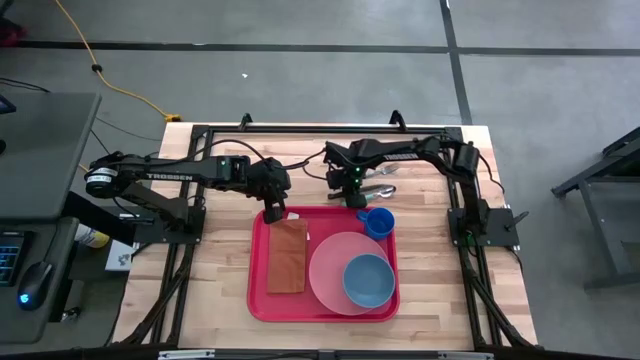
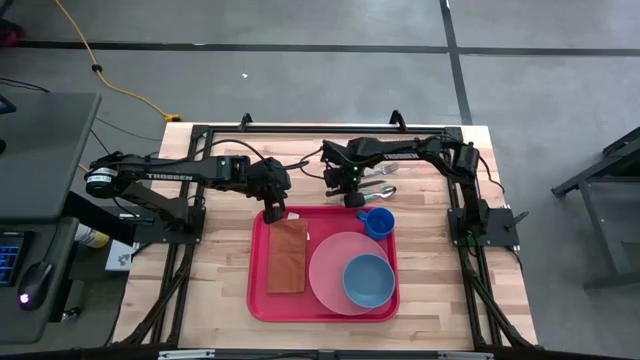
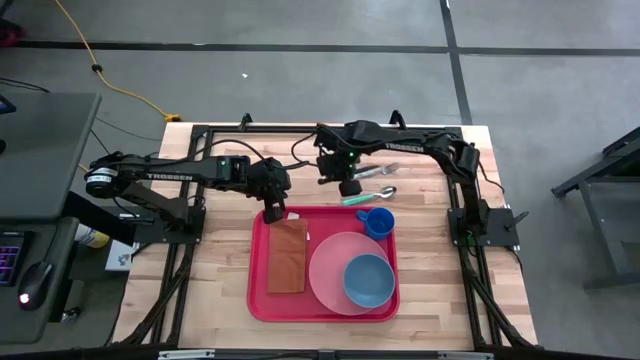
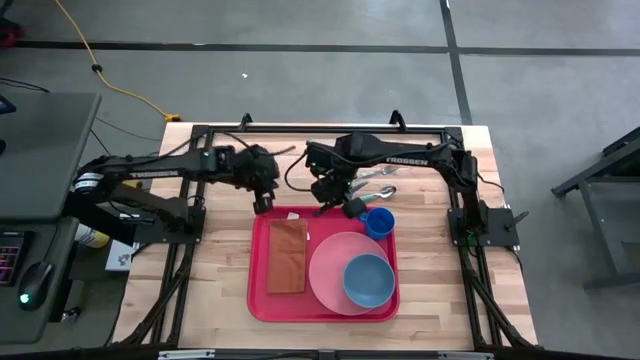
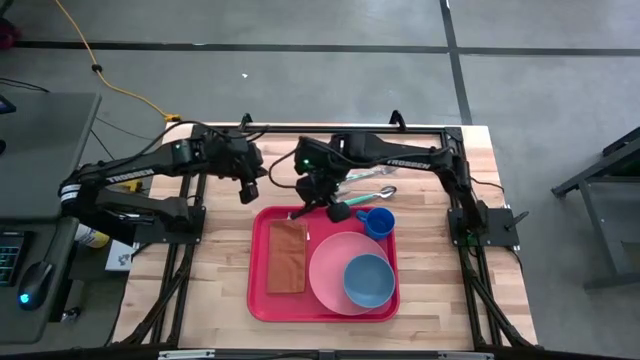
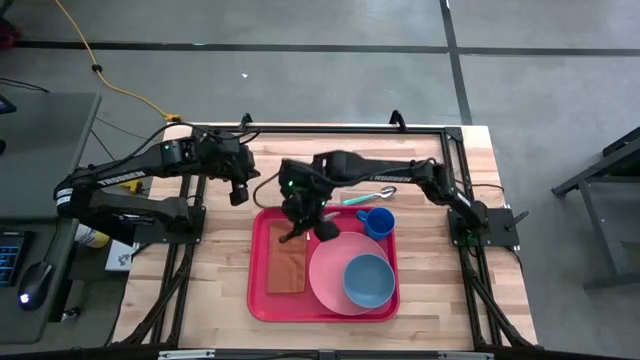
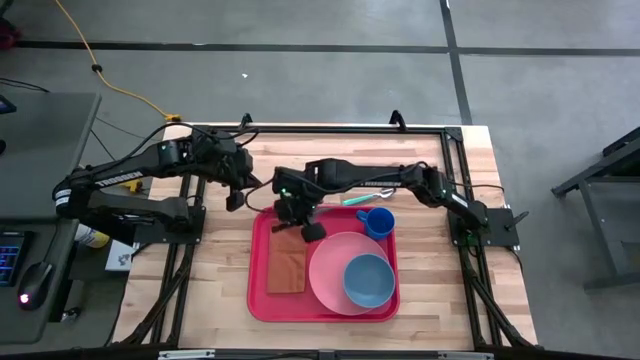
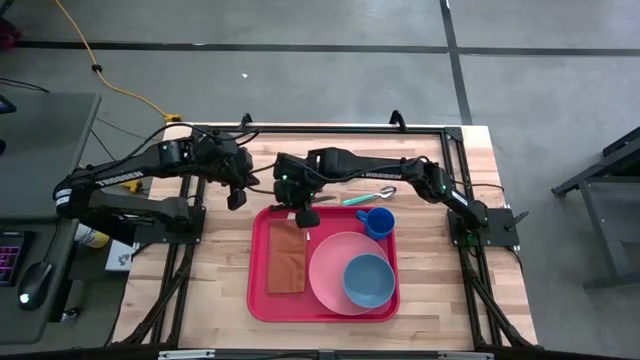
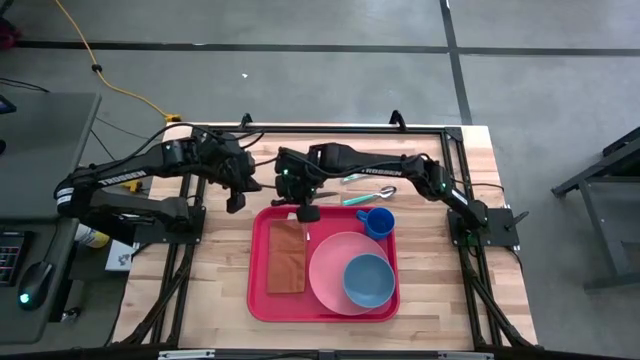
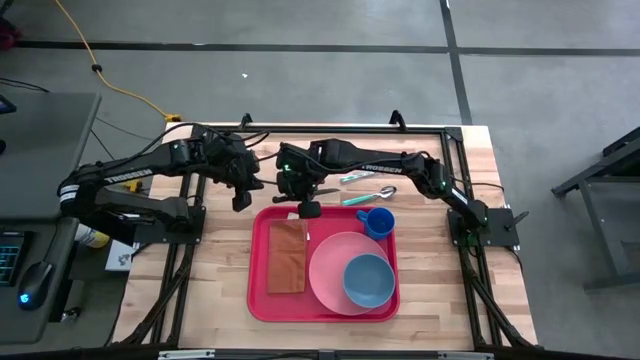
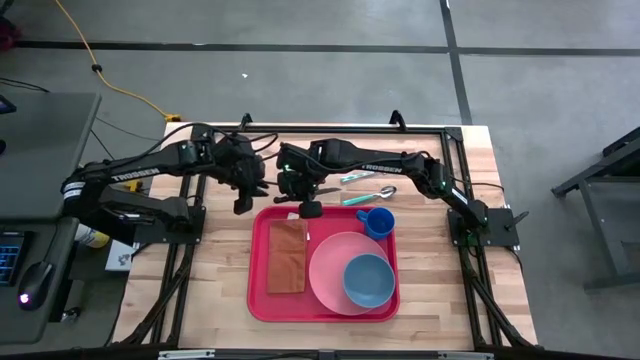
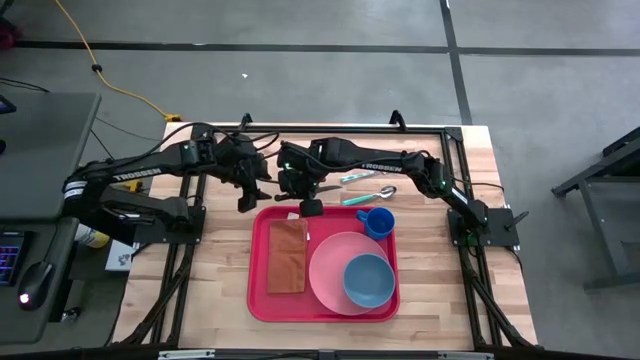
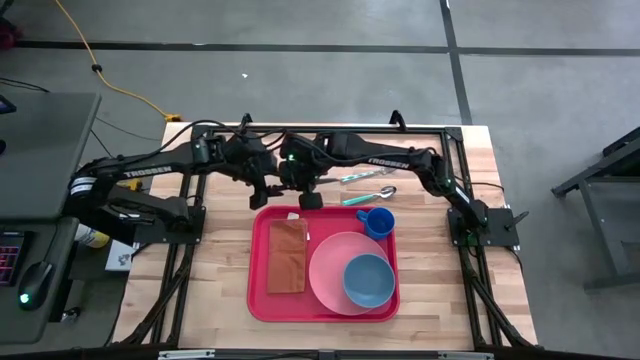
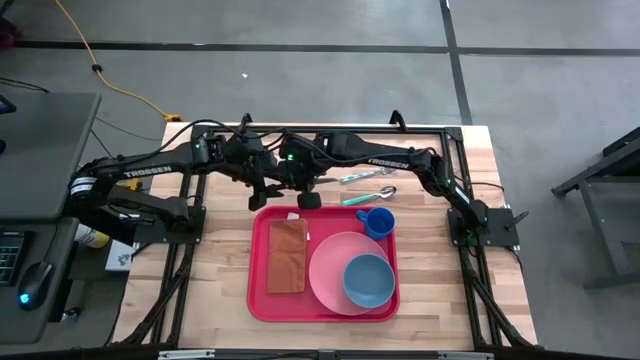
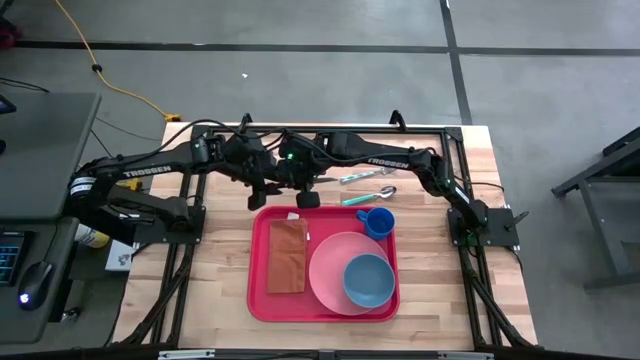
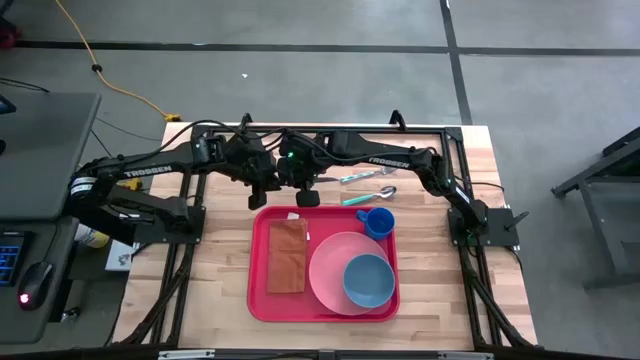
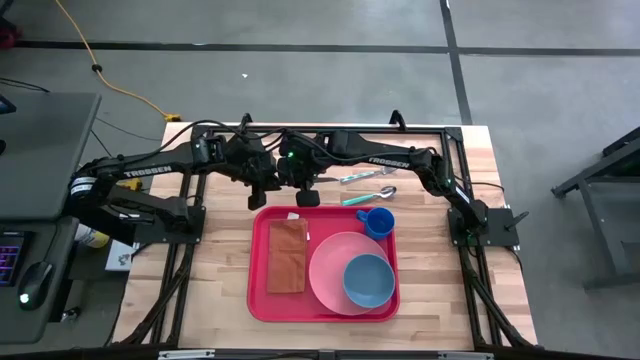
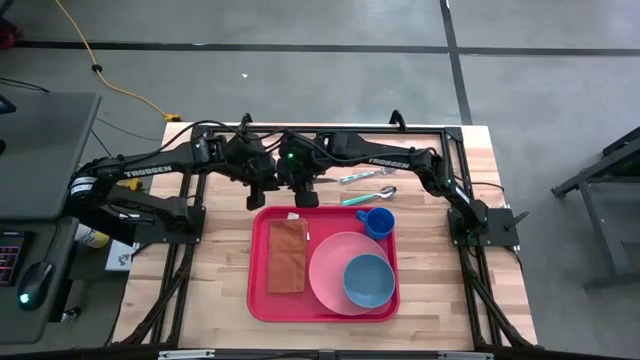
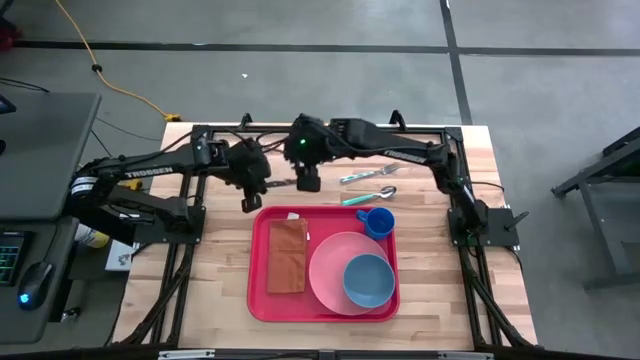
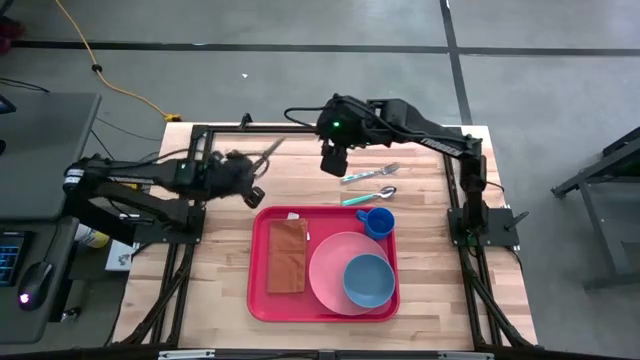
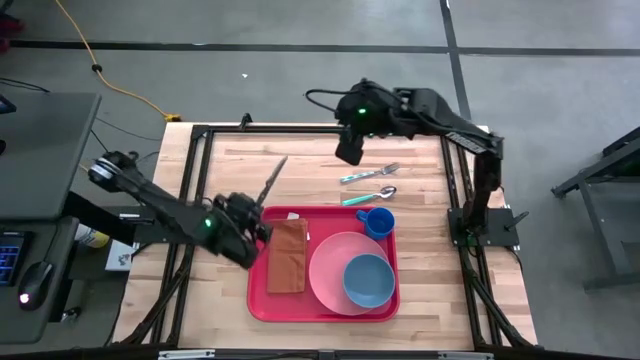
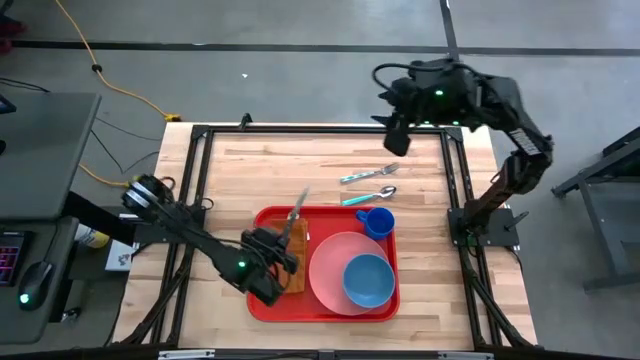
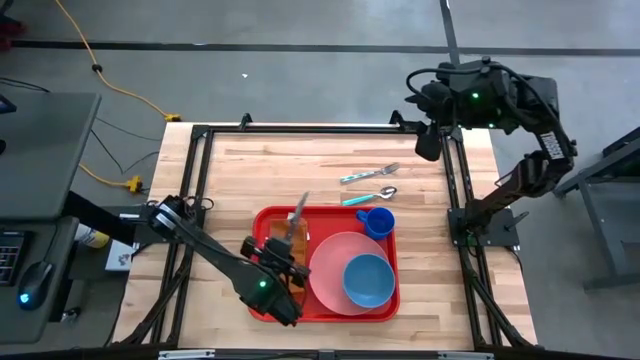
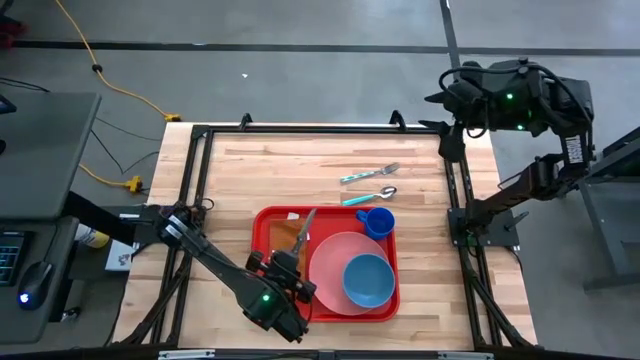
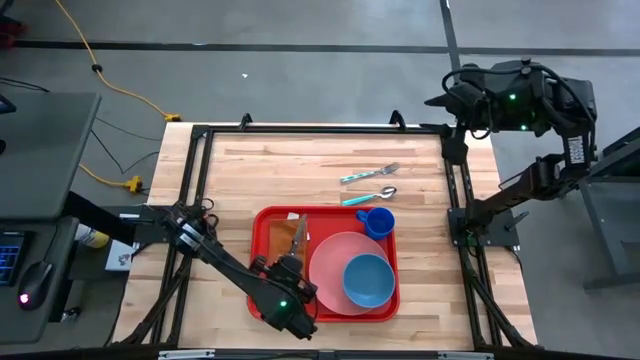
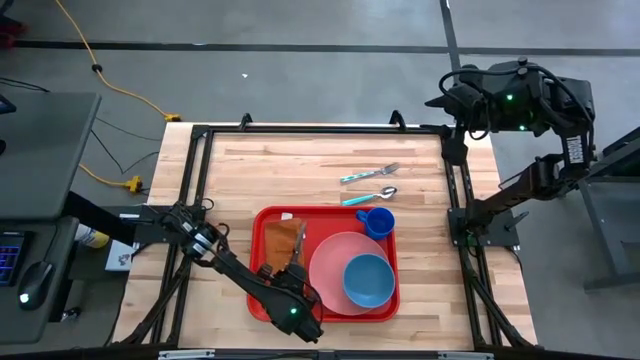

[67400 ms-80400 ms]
Task: Set up tray
Put the black knife on top of the orange napkin on the serving tray

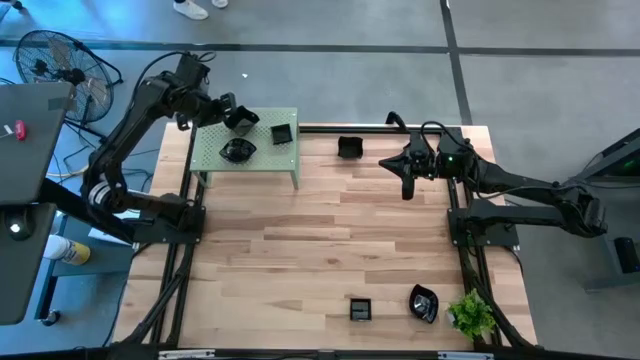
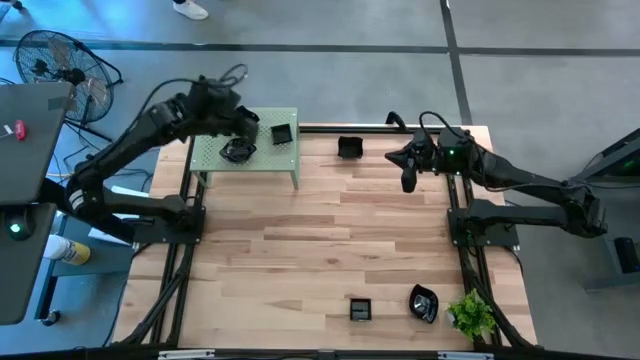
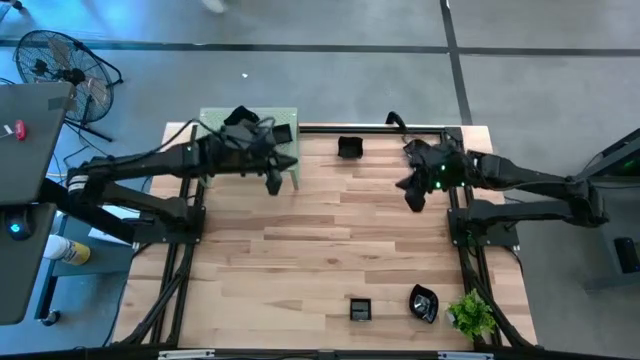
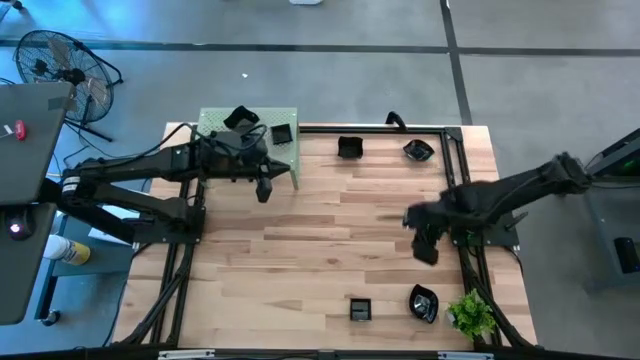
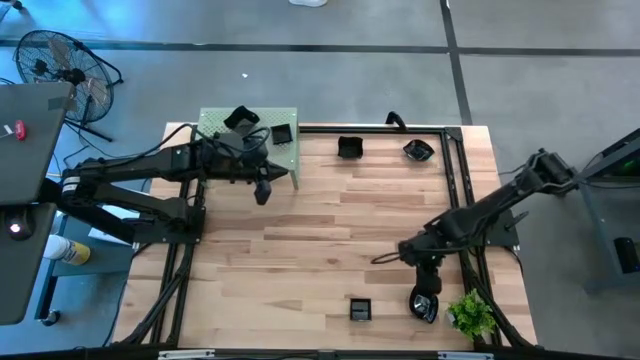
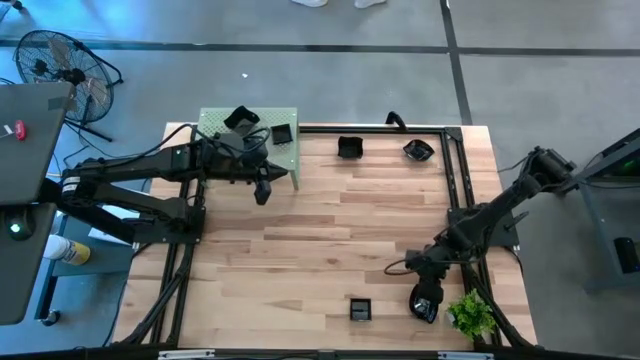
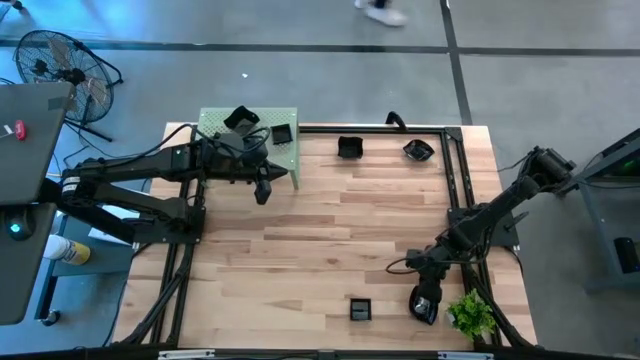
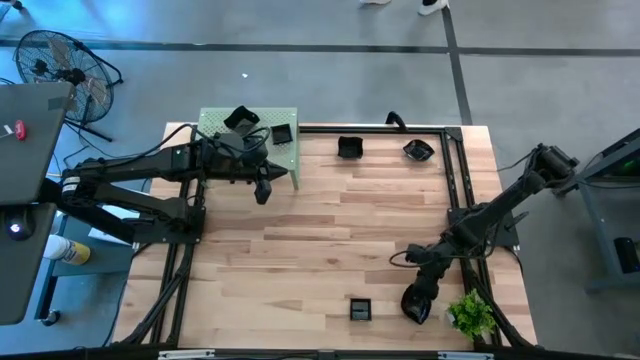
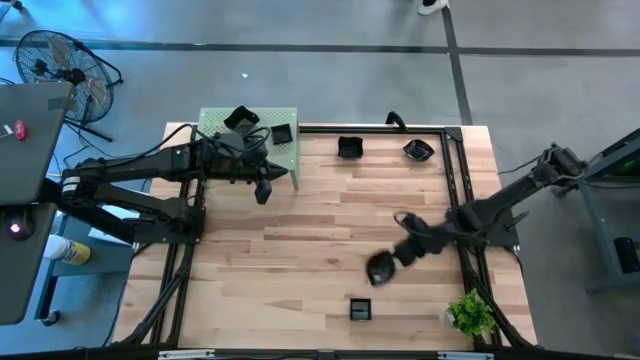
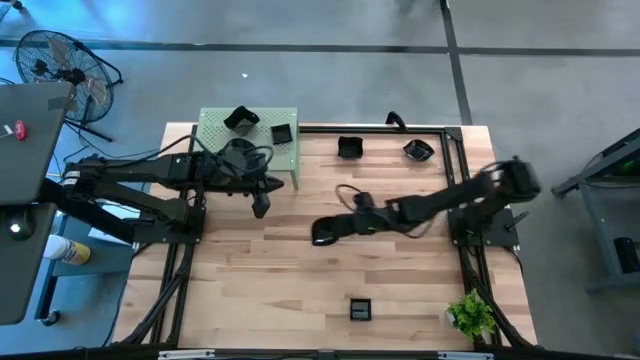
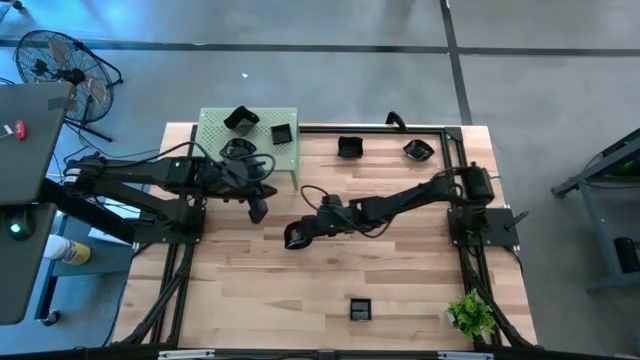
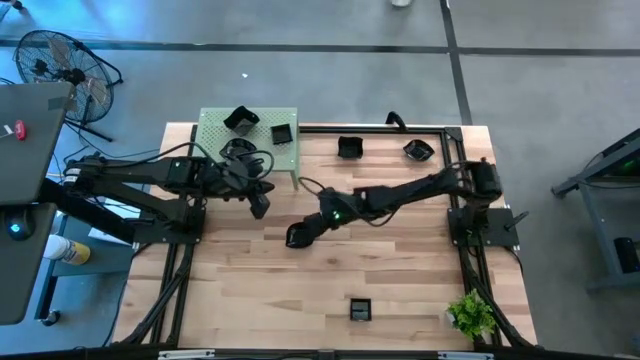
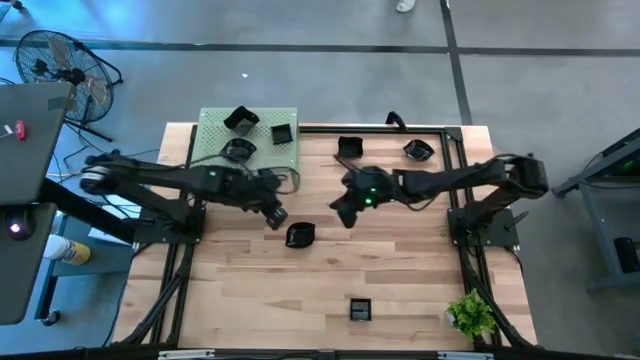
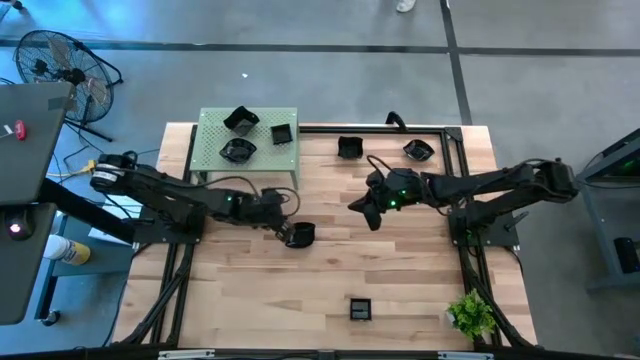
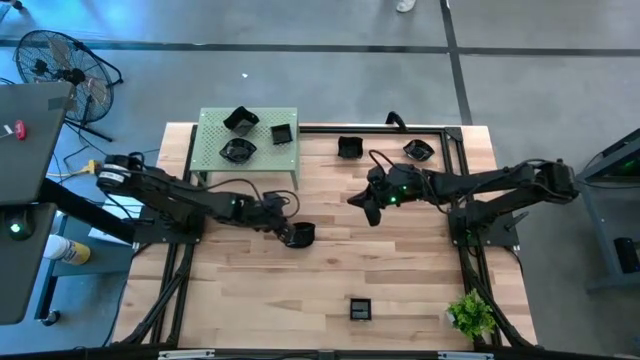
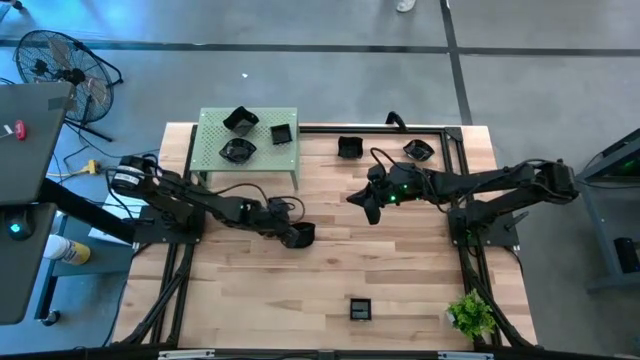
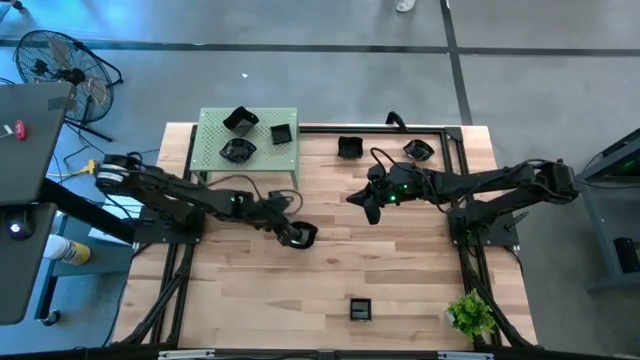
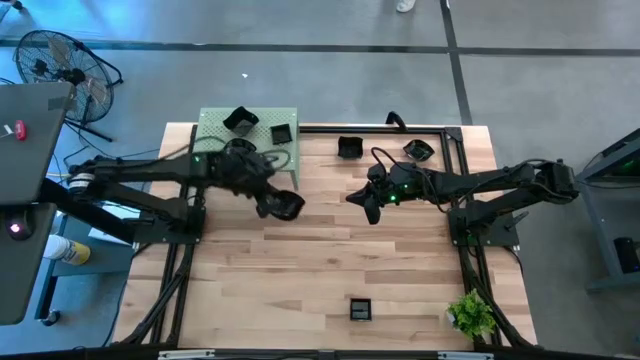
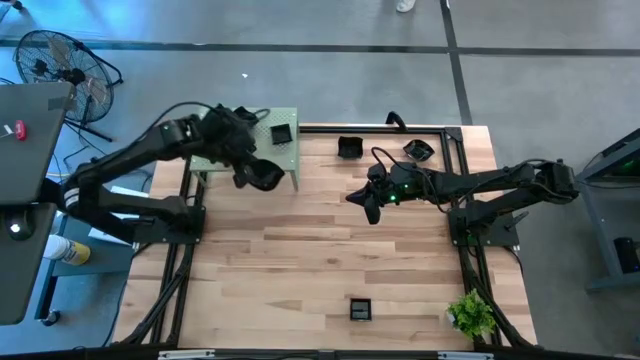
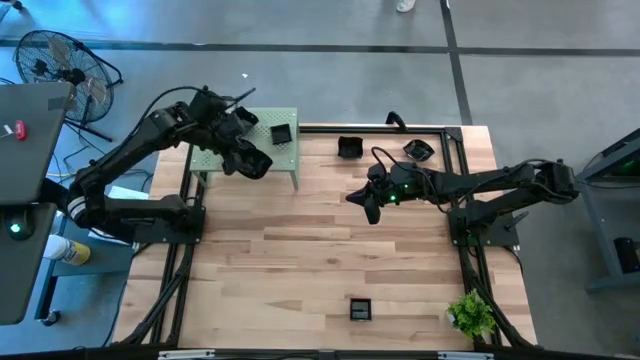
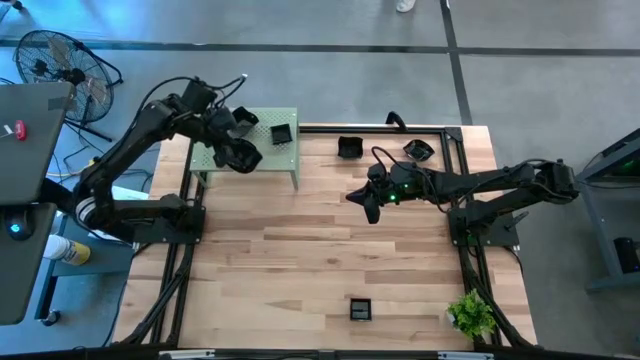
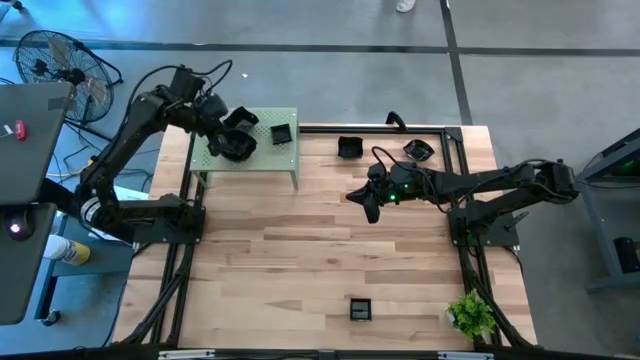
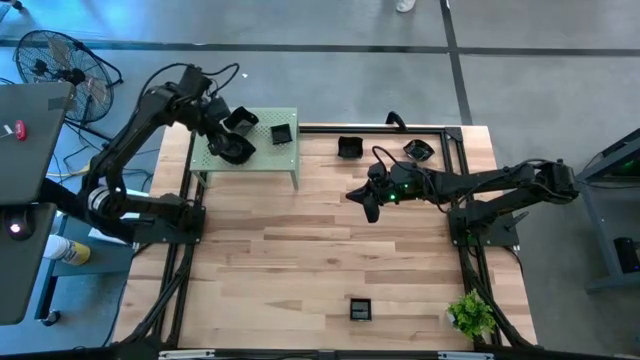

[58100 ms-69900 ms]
Task: Pick & Place Mini shaped plates
Stack the black leaf-shaped plate on top of the stacked black leaf-shaped plate on the shelf
